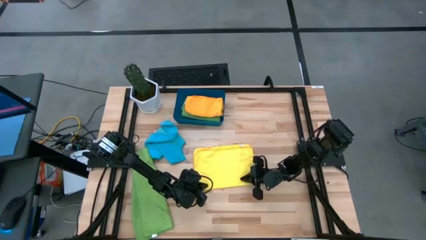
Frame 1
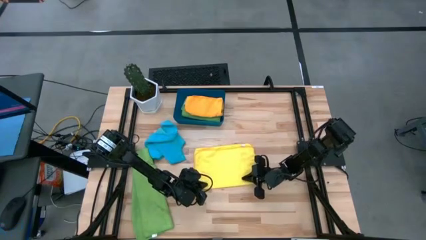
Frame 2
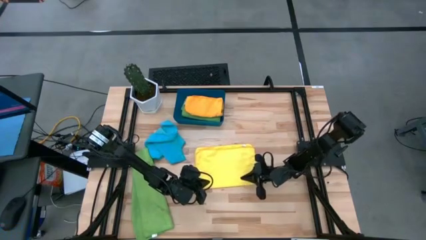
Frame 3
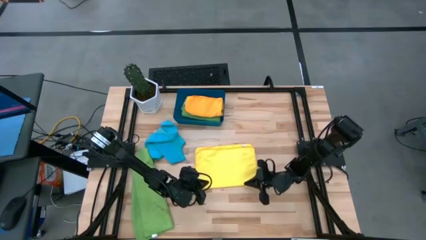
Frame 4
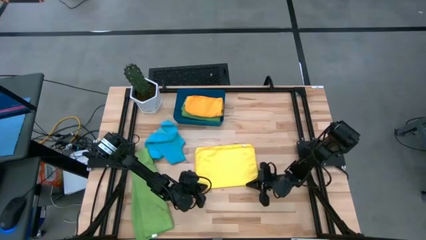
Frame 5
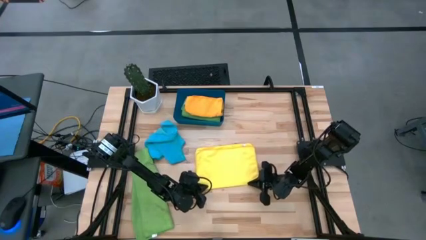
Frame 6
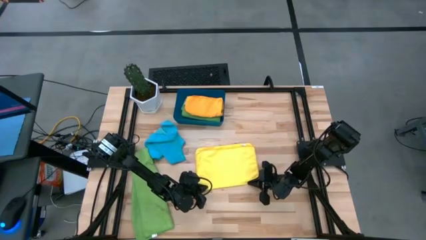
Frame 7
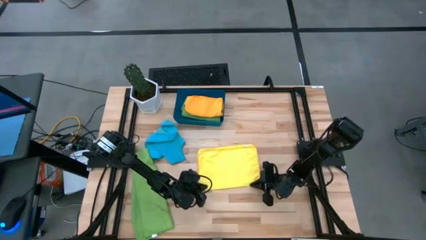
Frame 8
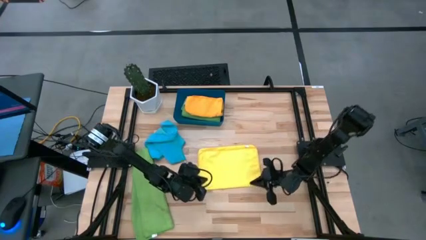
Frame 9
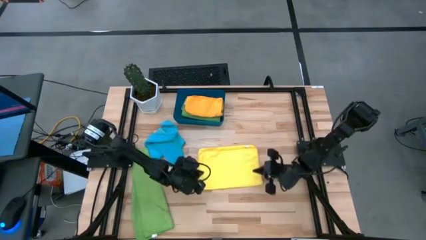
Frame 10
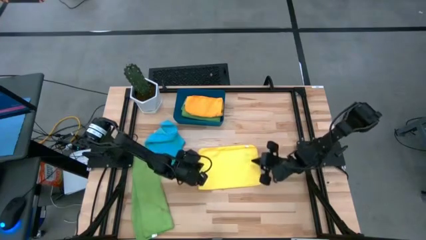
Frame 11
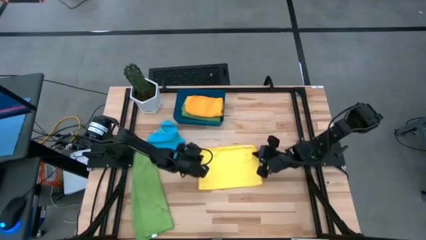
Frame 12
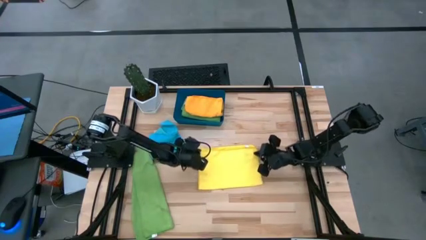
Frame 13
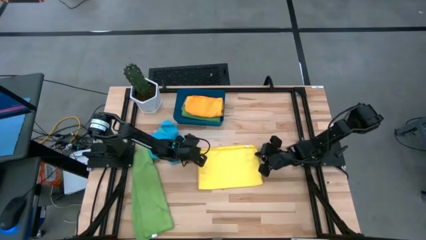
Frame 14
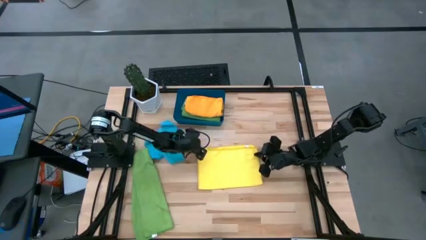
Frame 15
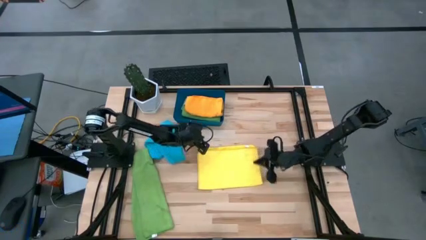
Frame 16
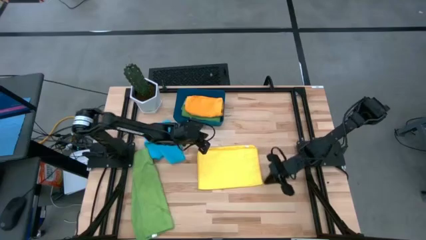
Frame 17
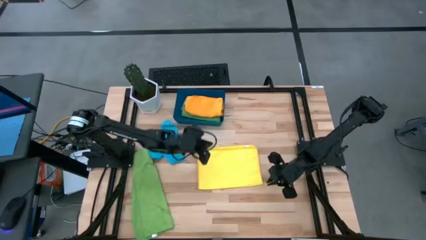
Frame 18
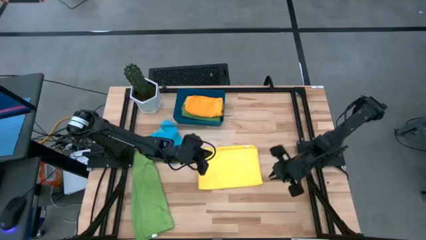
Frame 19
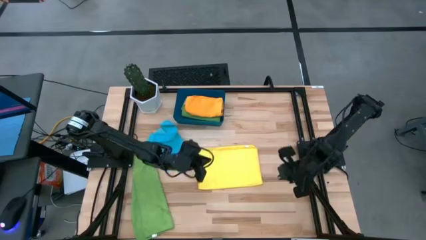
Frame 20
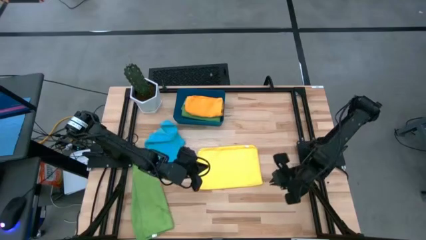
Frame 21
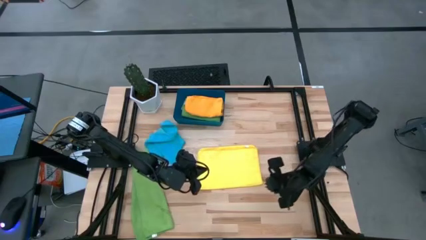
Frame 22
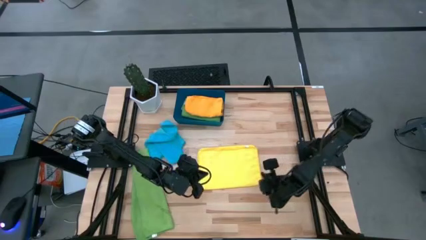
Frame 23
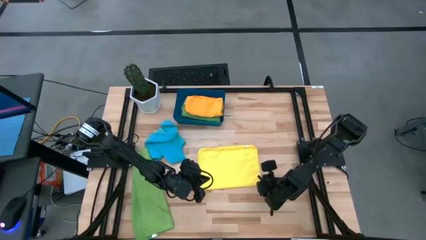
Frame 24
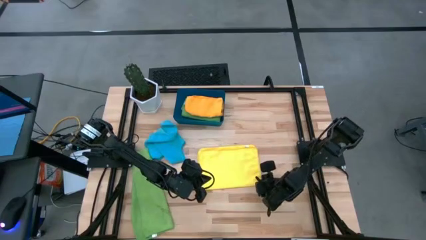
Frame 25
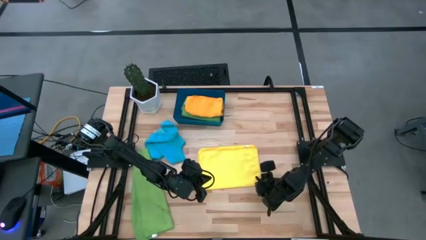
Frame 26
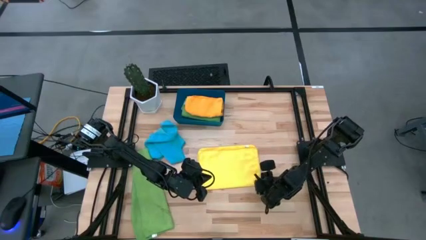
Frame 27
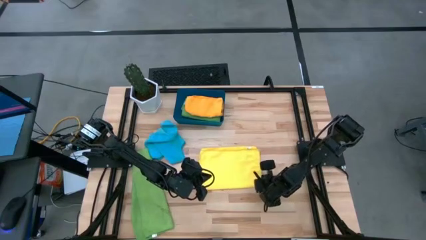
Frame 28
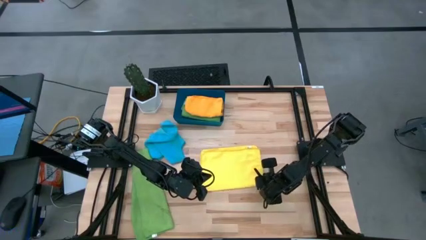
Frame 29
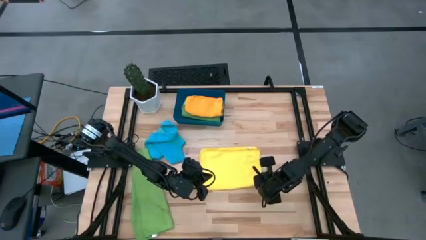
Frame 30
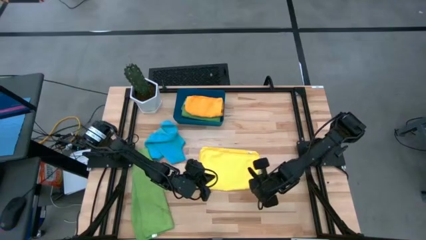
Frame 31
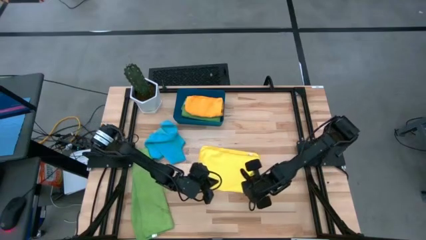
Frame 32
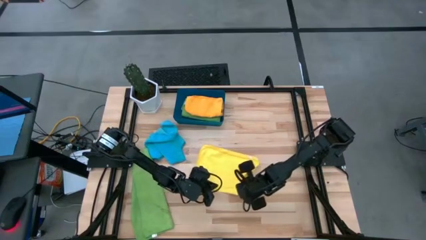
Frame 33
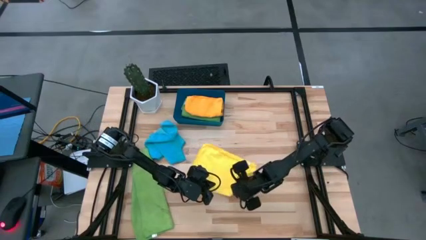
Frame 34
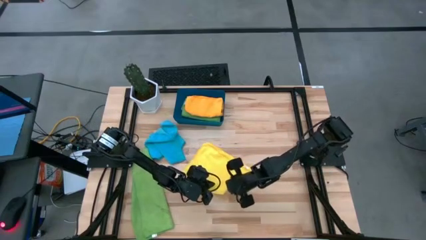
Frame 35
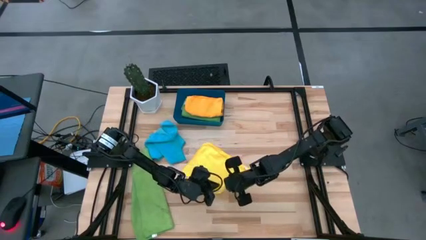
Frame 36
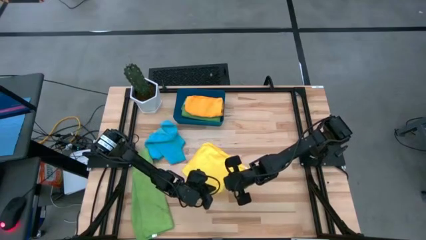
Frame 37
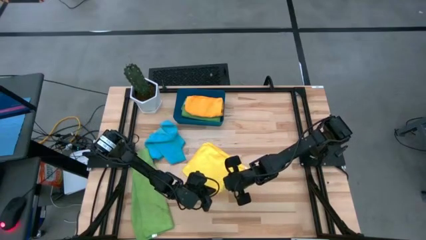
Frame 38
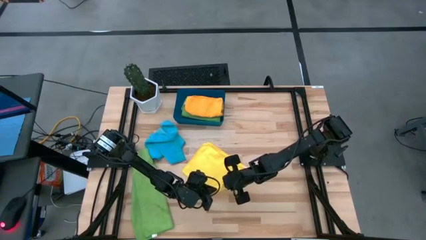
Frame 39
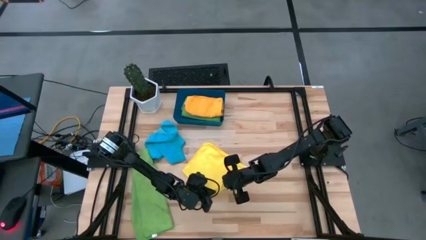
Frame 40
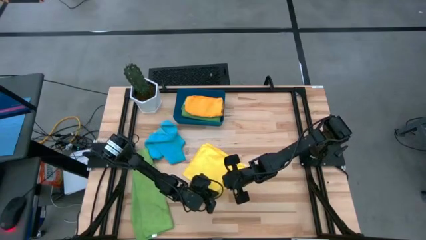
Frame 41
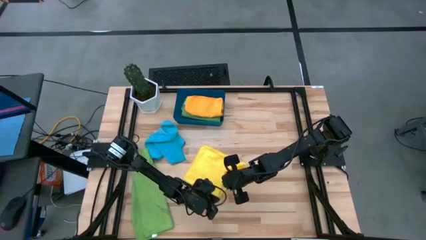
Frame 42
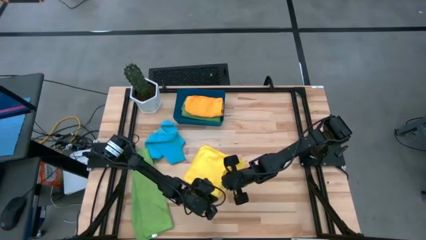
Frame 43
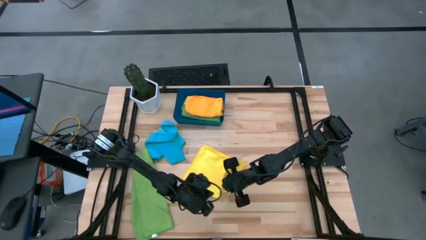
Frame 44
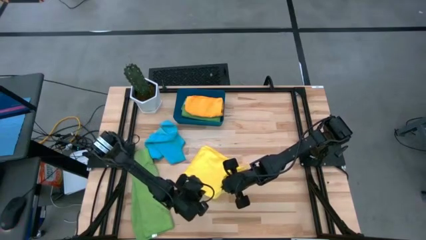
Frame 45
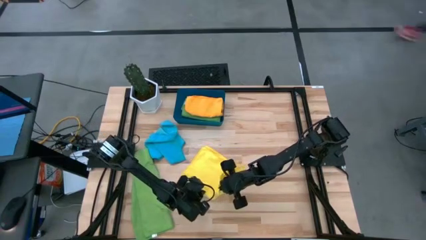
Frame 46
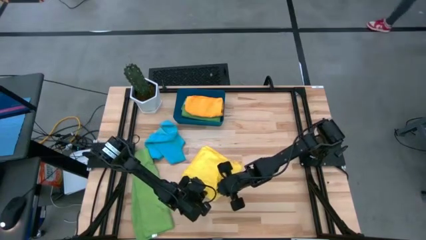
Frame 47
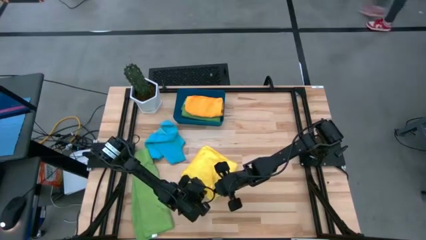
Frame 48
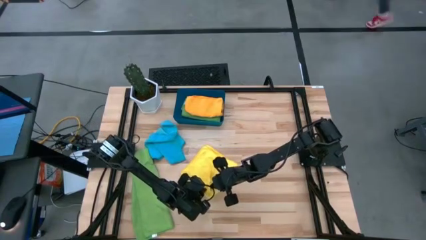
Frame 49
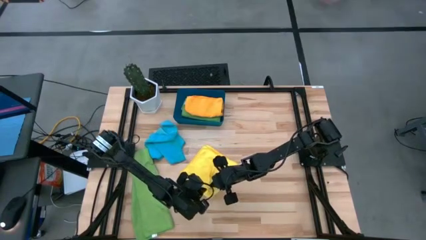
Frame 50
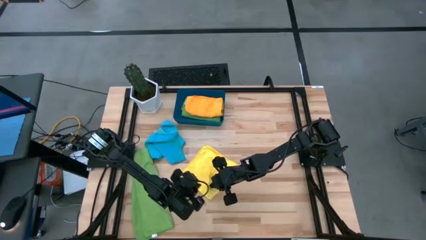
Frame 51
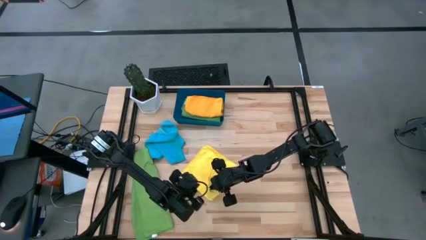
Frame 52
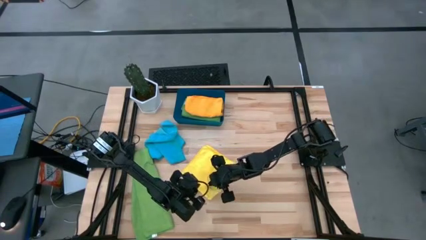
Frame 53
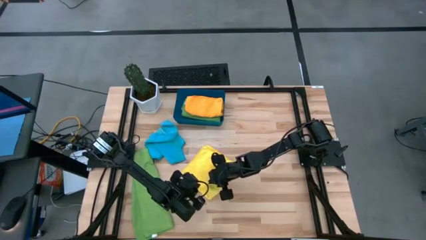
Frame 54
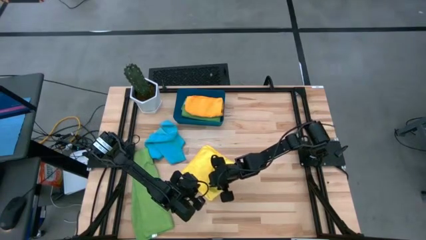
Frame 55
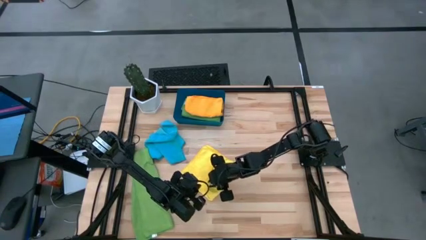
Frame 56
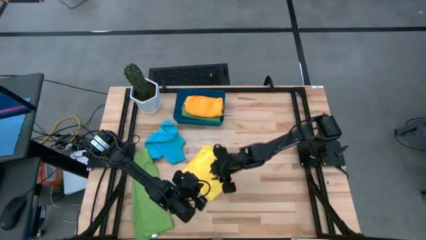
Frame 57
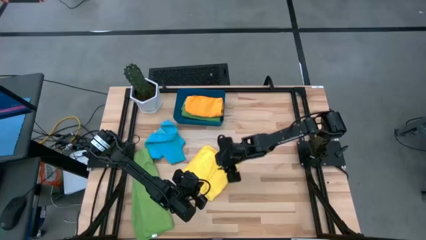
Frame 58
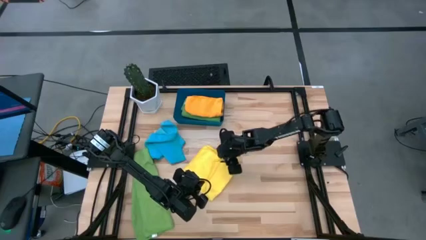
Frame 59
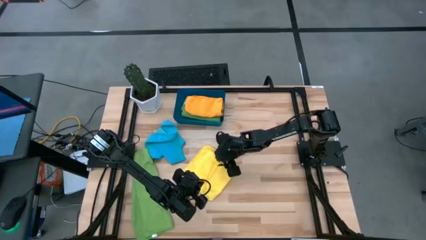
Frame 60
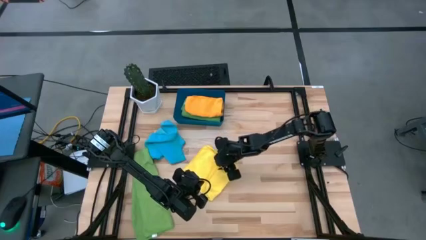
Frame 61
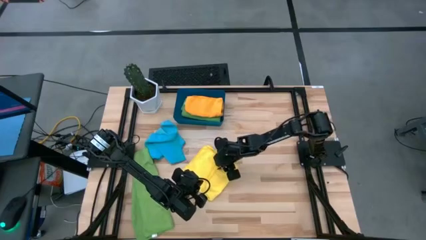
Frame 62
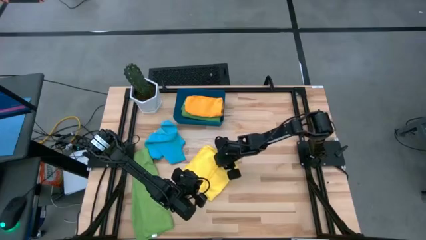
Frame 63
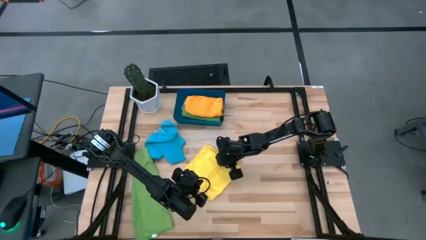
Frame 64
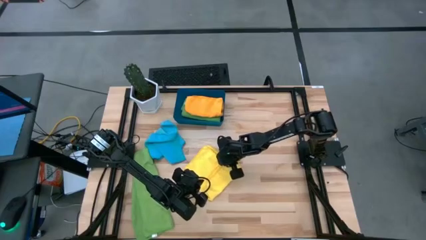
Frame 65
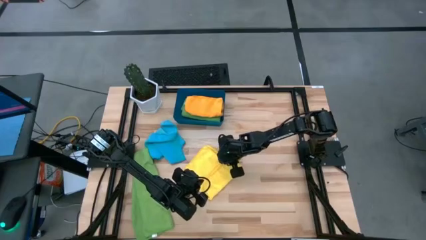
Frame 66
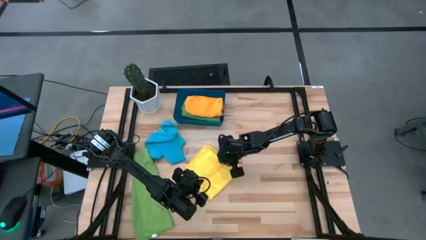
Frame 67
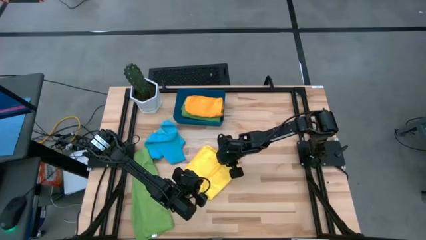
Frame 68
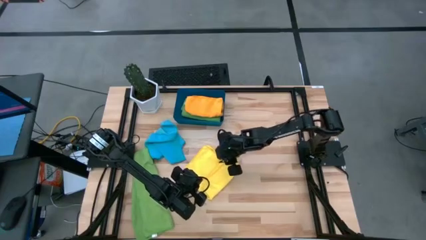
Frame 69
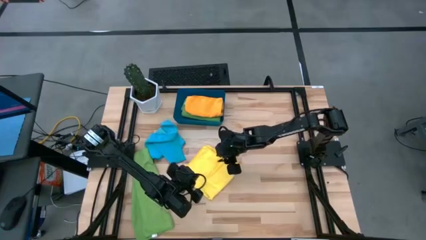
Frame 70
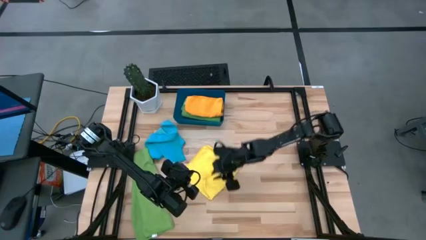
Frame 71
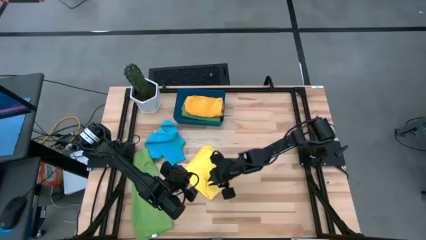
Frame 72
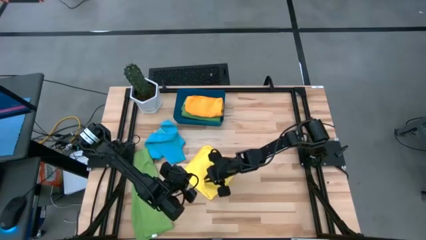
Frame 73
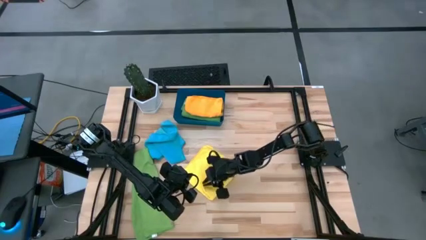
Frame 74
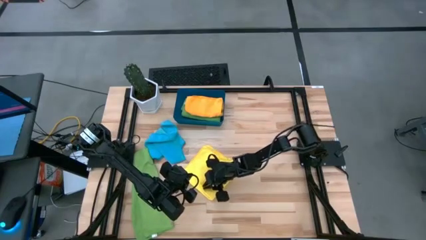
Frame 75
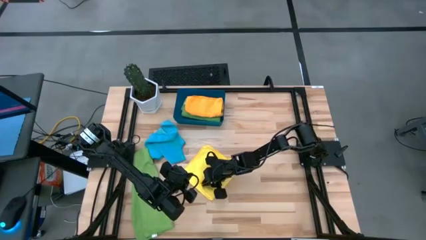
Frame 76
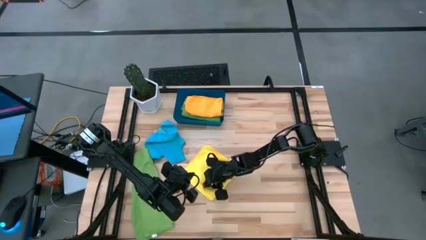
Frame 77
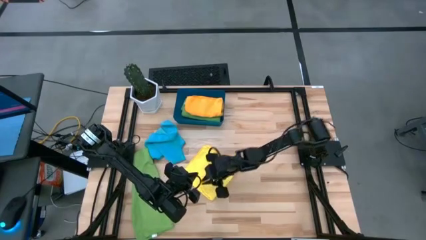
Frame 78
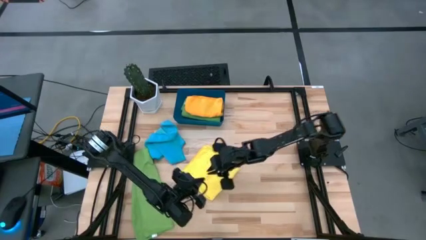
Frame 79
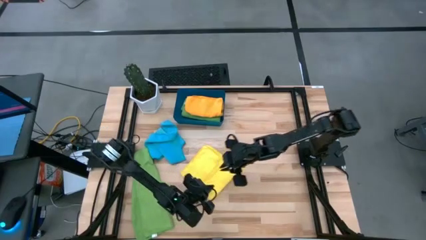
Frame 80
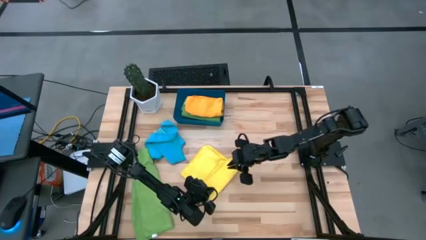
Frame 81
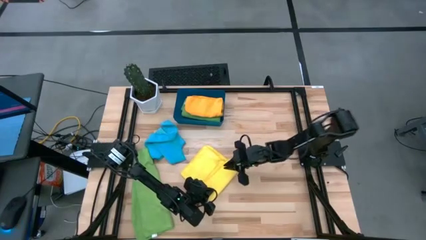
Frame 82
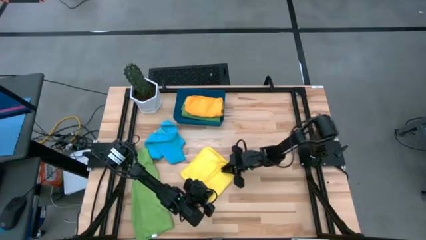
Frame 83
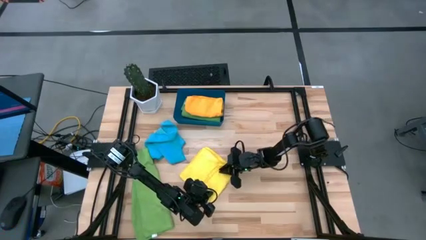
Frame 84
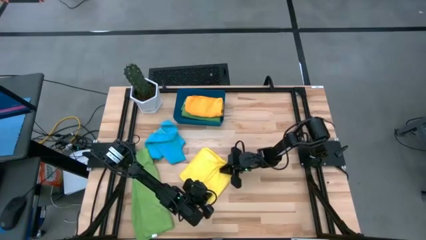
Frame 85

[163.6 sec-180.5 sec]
Task: Fold microfiber towels
Fold the yellow towel
